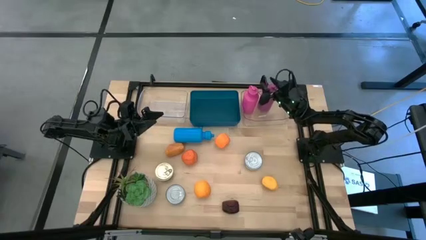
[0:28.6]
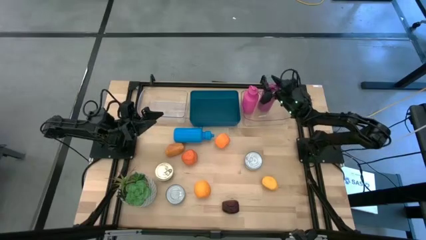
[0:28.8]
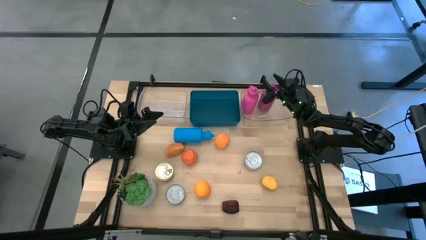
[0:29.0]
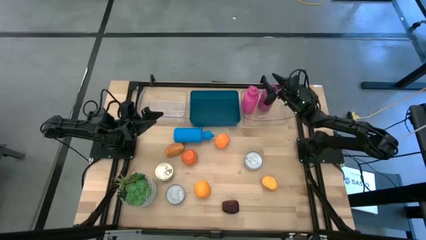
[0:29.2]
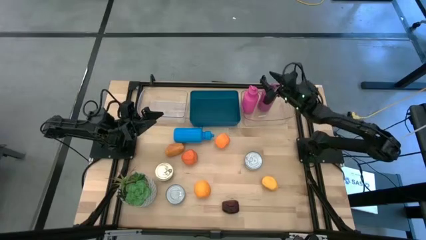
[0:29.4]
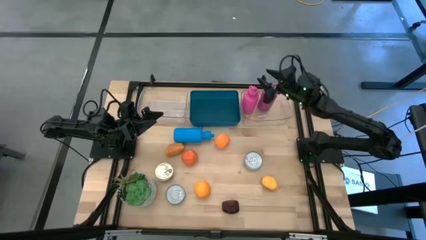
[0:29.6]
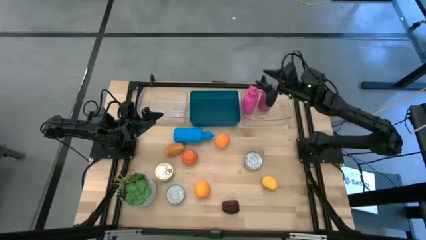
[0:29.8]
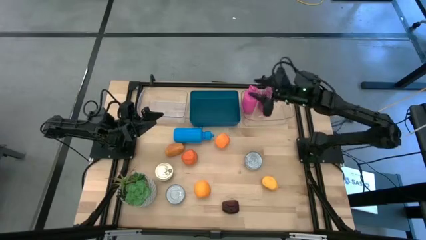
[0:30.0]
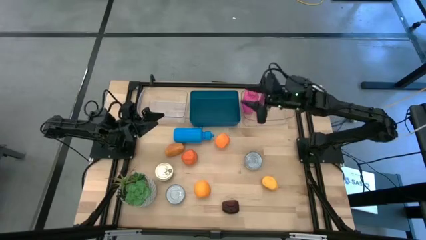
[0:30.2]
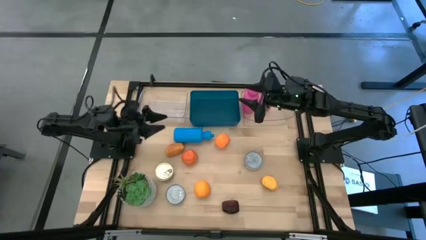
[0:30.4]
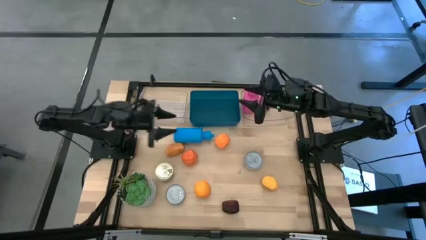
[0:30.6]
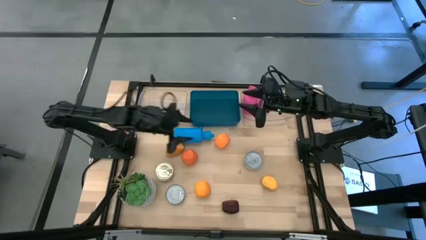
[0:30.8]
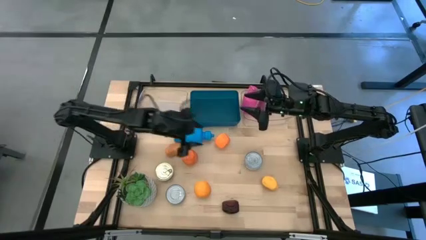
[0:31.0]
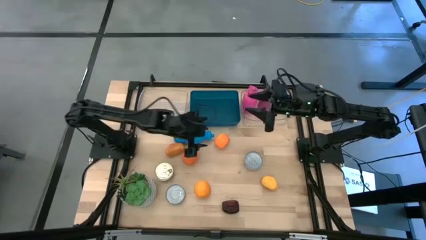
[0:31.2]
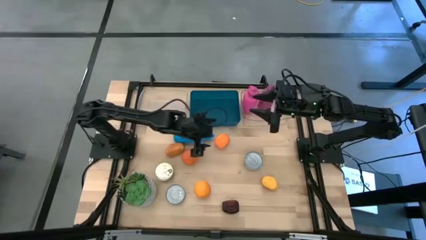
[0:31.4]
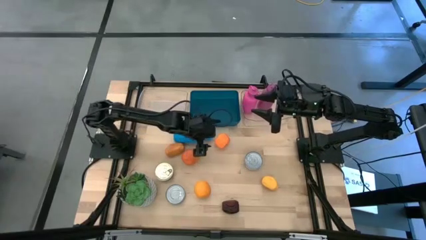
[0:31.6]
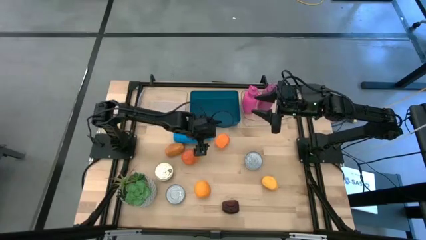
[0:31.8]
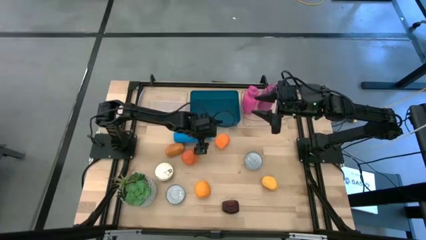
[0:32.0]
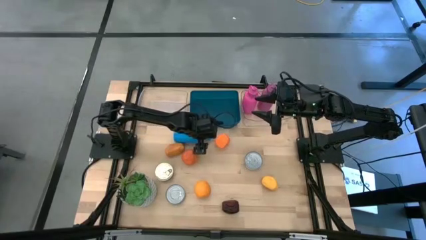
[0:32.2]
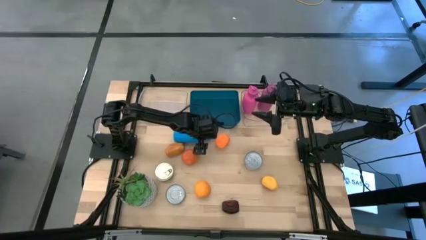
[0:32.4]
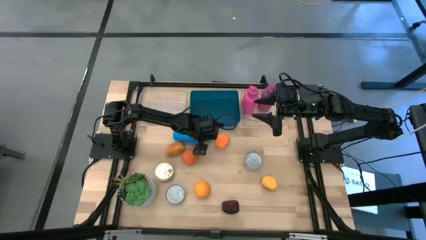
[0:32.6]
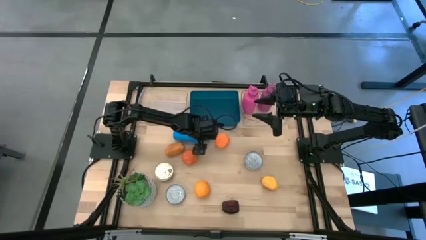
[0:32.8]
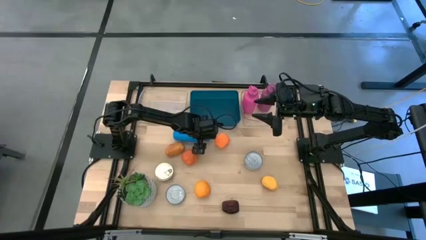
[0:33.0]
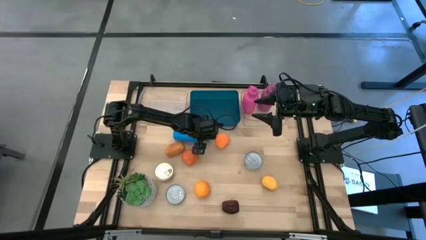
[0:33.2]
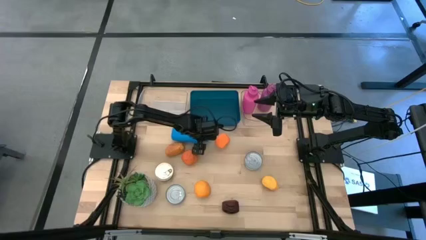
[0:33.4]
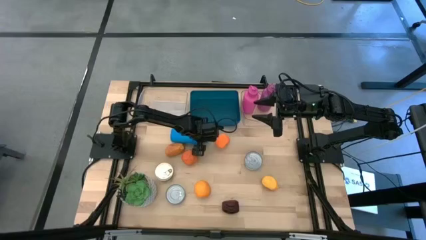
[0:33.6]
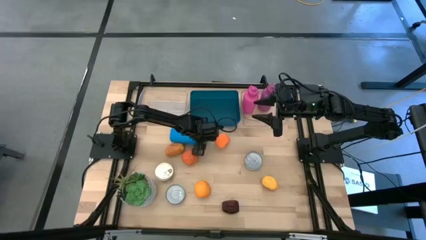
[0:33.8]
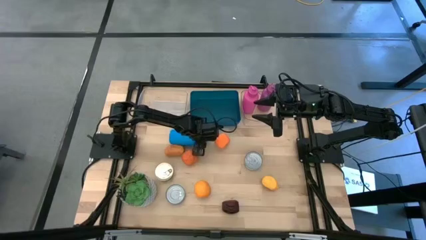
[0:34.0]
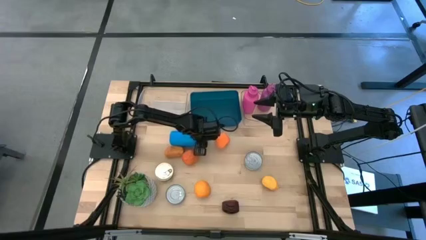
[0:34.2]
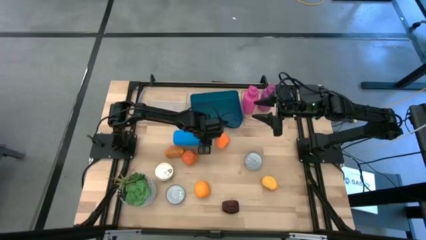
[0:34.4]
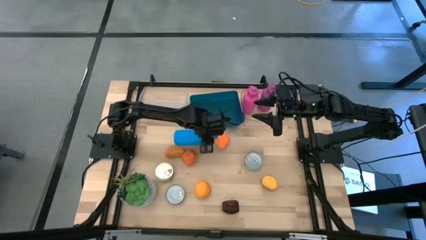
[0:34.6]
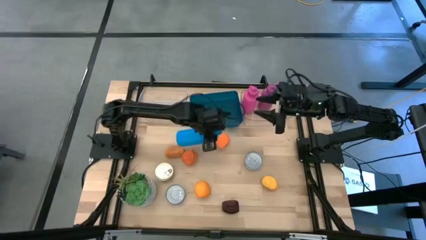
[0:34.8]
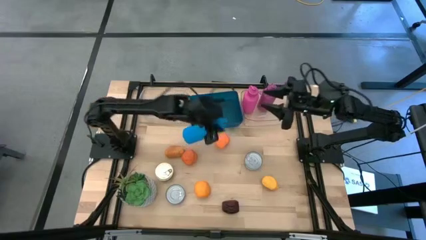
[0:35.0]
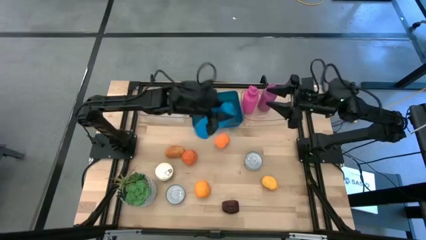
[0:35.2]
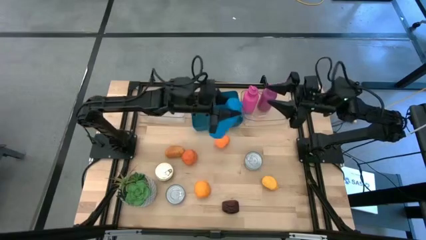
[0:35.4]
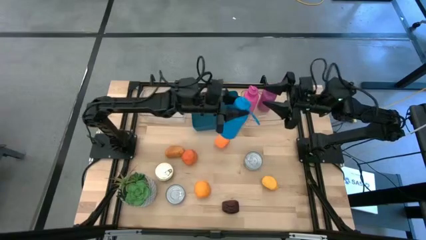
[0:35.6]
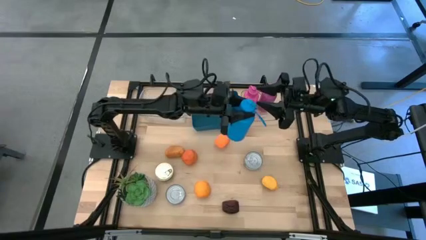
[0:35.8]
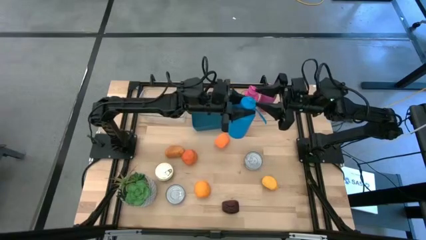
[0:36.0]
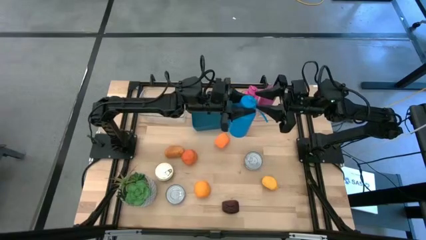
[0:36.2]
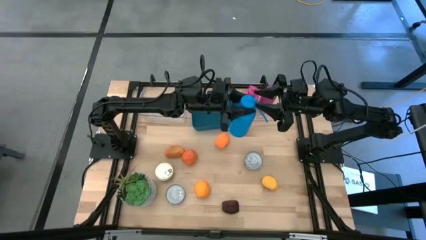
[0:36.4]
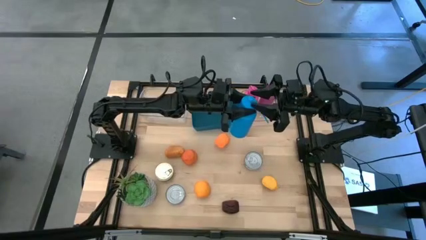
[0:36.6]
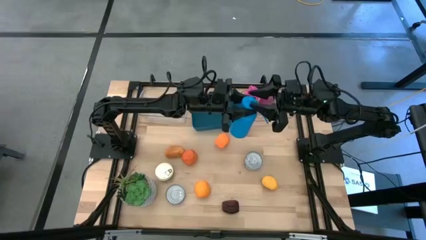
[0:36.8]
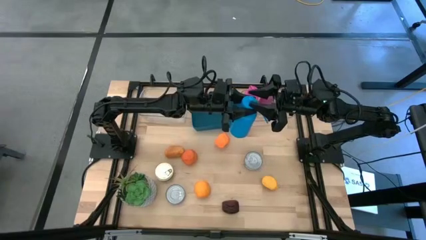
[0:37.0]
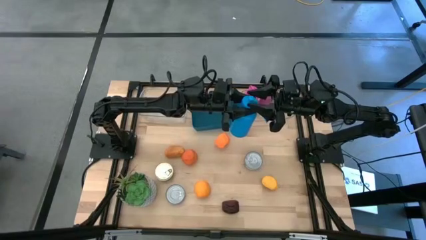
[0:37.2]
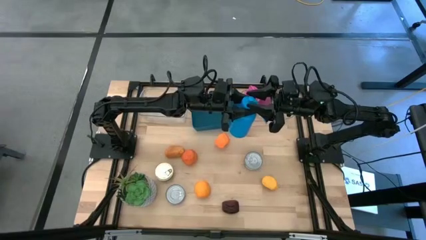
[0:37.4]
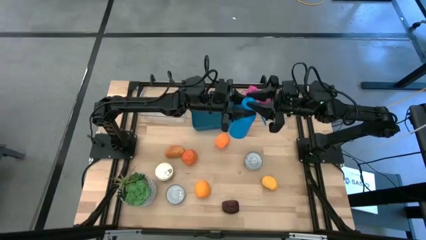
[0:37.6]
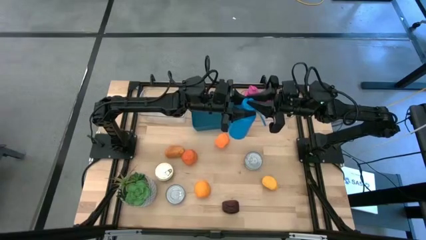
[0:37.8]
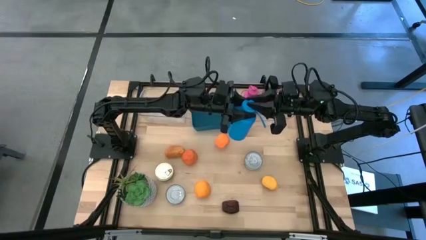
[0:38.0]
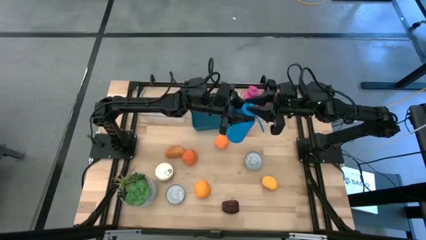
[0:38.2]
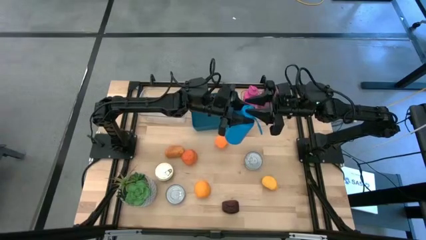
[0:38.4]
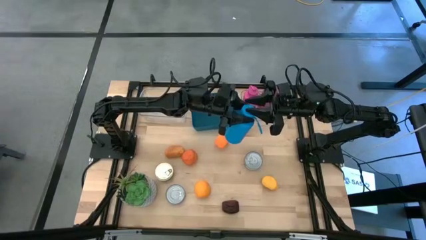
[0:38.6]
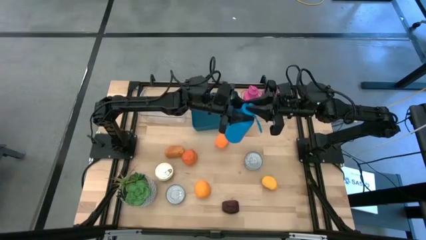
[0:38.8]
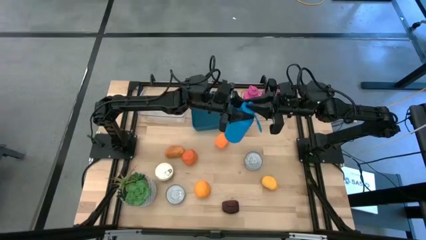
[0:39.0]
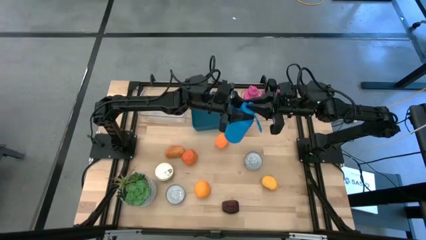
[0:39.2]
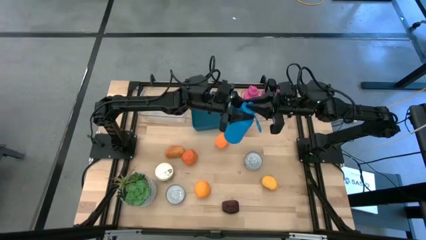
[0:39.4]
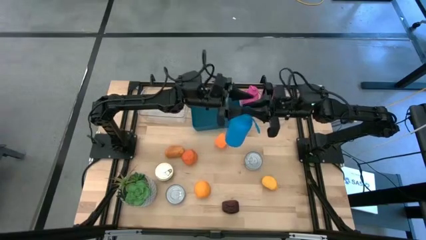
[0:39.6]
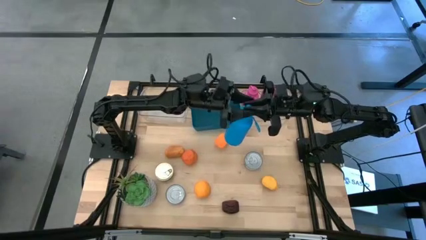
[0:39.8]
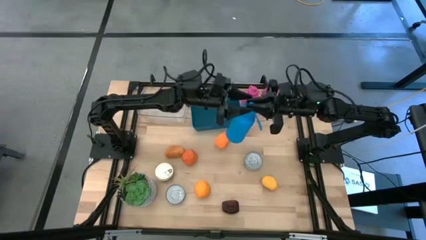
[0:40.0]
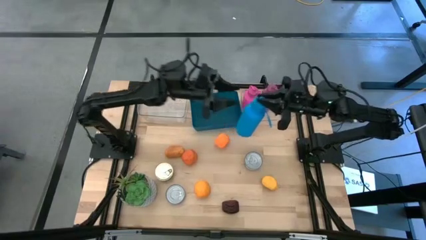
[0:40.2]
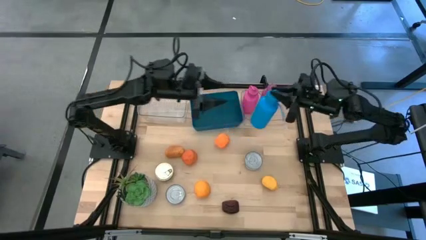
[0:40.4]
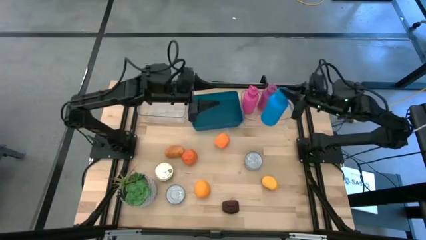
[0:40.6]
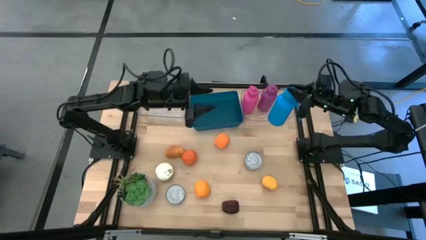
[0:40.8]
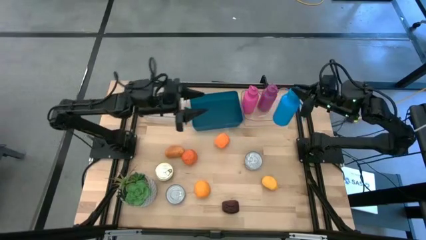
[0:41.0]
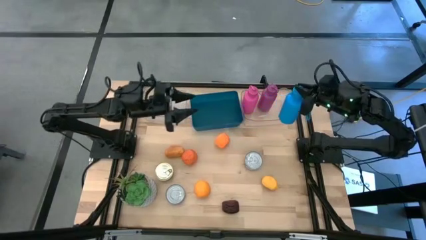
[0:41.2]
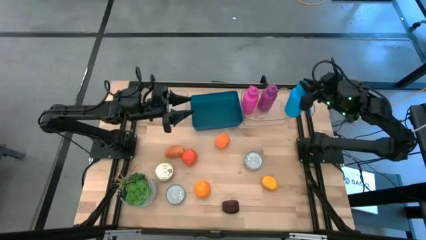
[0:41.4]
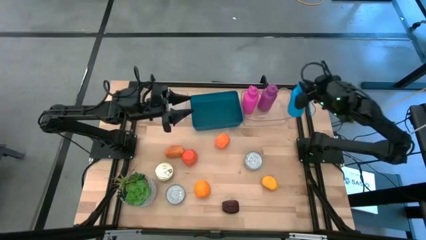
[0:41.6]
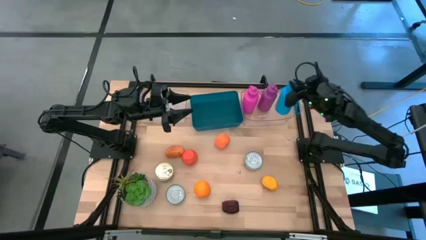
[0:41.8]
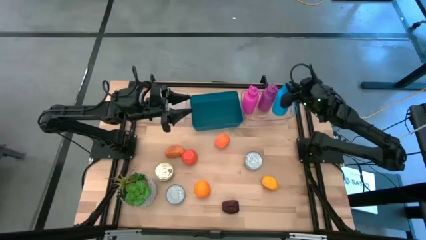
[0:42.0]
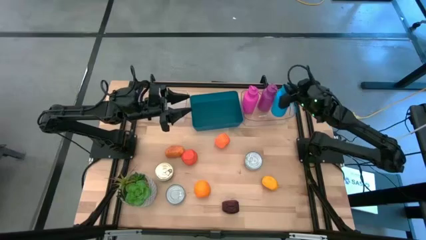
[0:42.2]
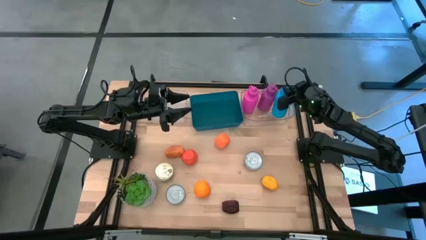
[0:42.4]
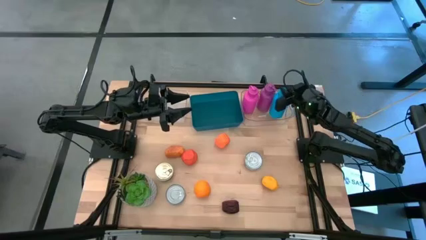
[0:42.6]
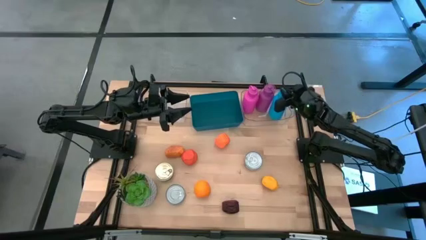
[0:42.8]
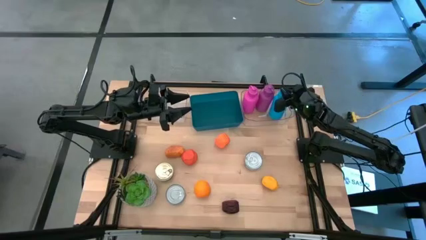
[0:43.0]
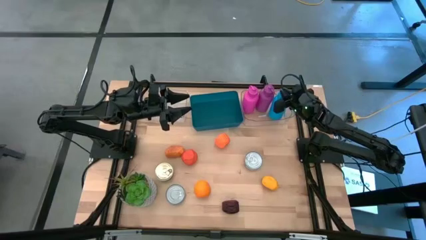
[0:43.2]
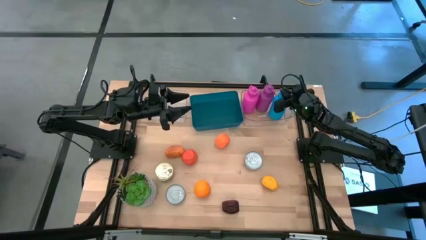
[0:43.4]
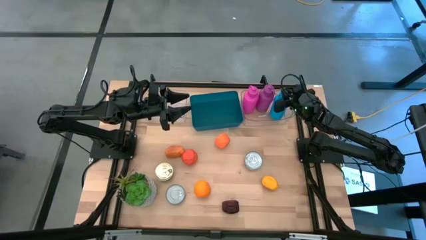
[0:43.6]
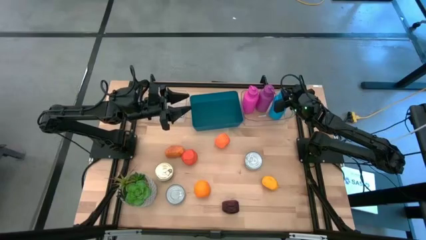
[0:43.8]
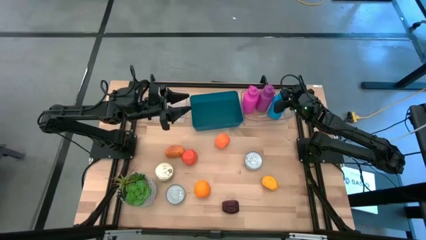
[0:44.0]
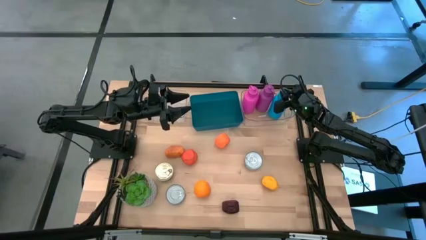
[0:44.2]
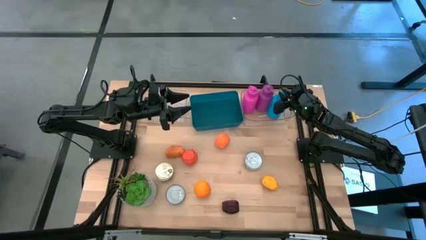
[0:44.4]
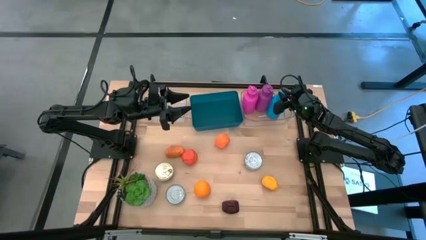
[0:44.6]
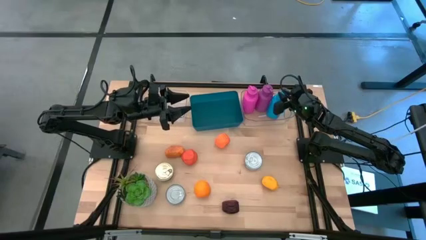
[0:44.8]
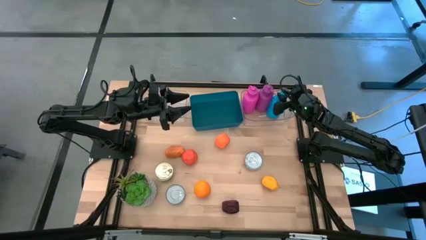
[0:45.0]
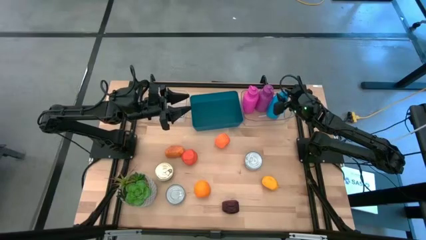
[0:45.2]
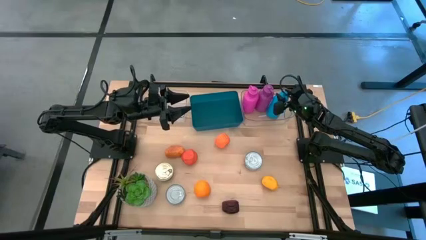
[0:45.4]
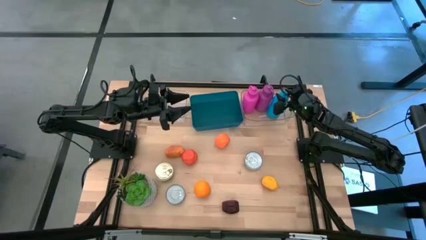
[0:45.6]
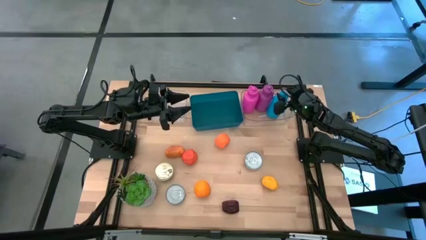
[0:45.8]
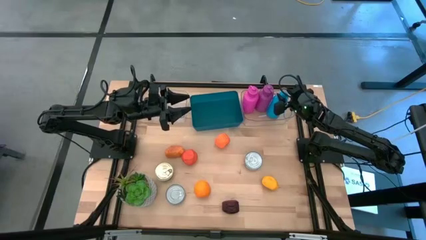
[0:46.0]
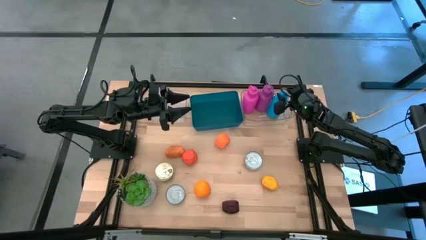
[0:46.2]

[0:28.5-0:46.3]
Task: Pick & Place Food Item
Put the blue tumbler into the right transparent bin
